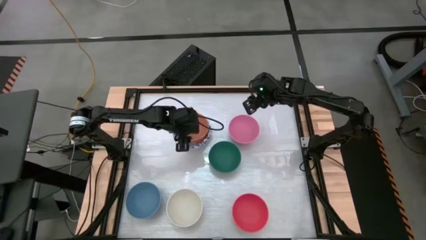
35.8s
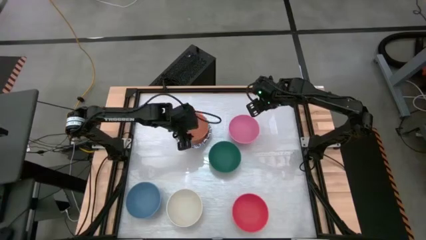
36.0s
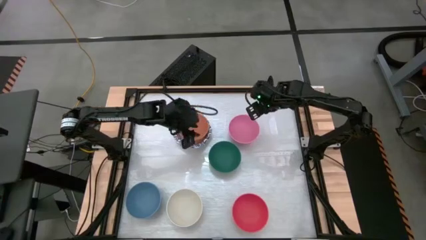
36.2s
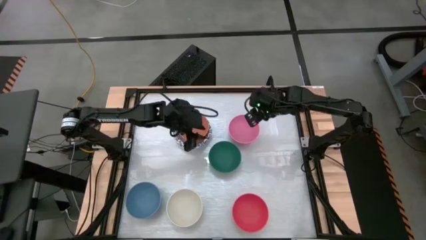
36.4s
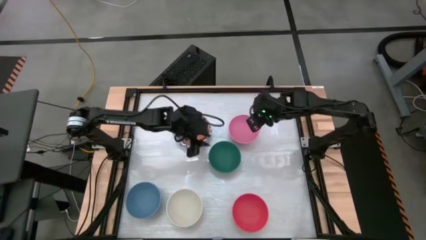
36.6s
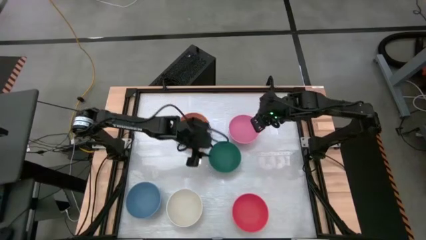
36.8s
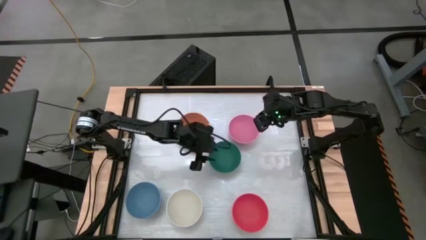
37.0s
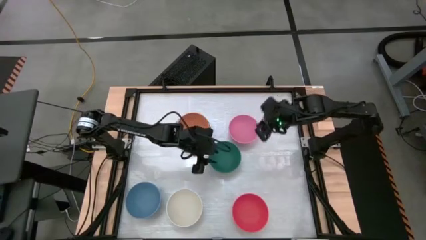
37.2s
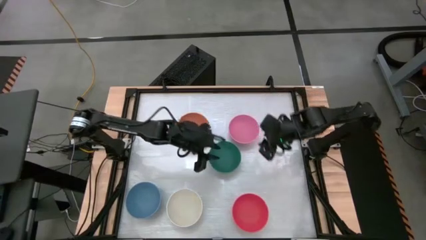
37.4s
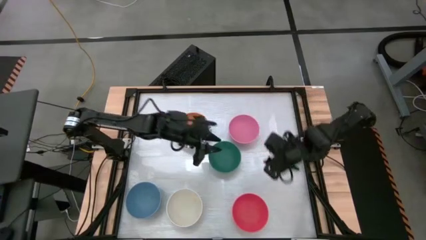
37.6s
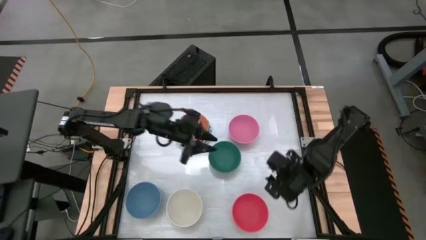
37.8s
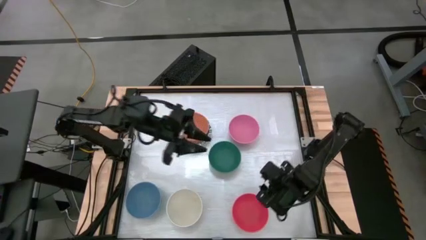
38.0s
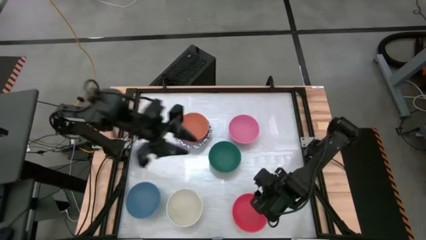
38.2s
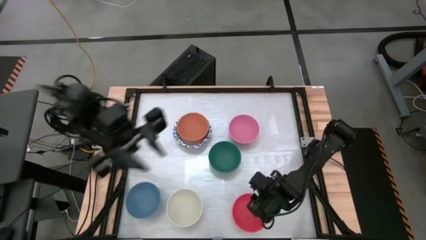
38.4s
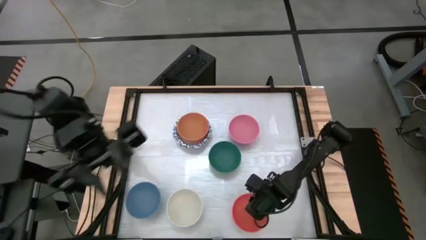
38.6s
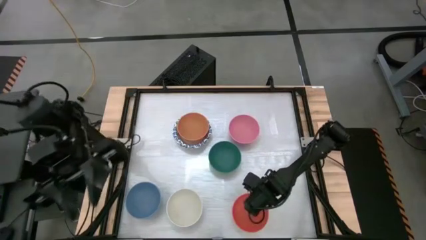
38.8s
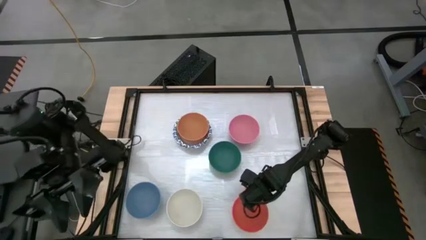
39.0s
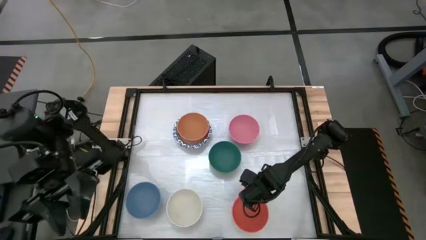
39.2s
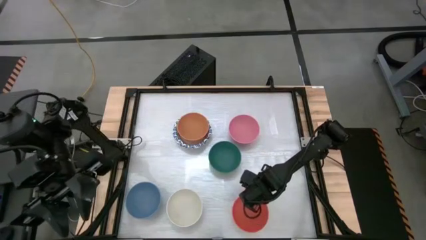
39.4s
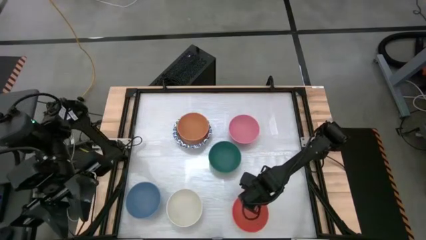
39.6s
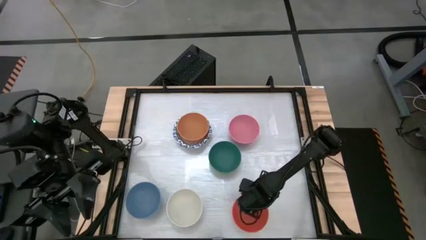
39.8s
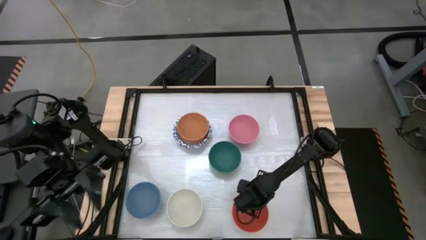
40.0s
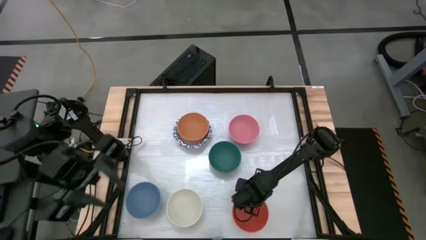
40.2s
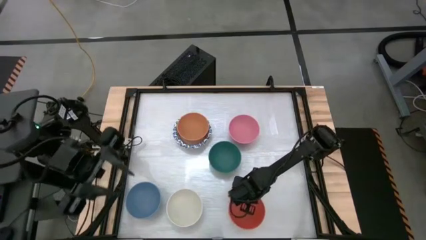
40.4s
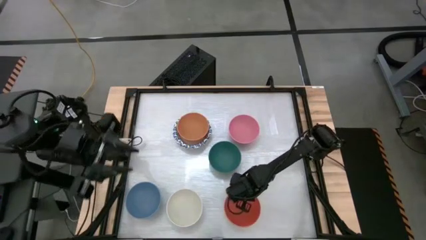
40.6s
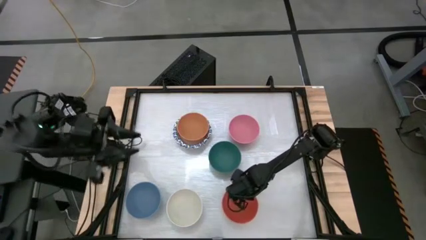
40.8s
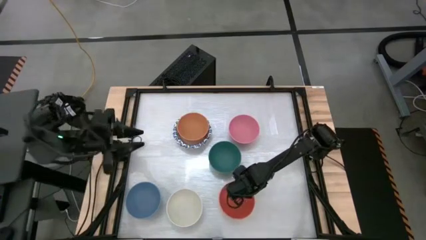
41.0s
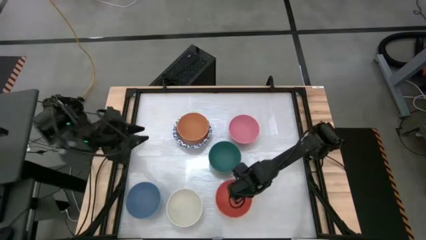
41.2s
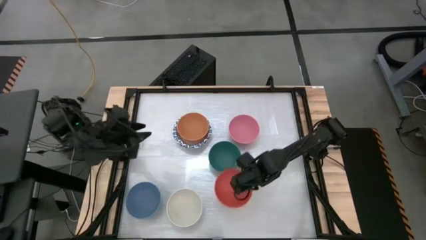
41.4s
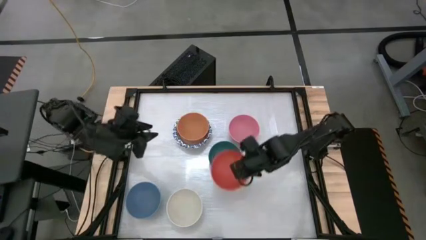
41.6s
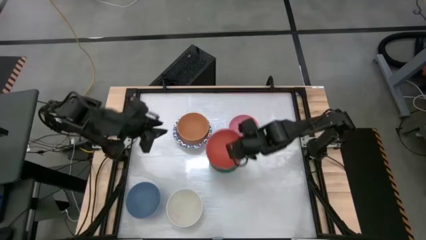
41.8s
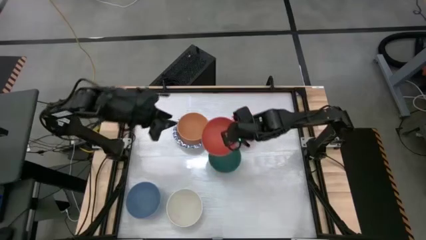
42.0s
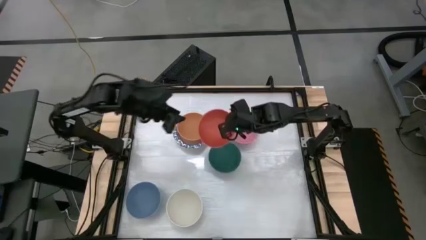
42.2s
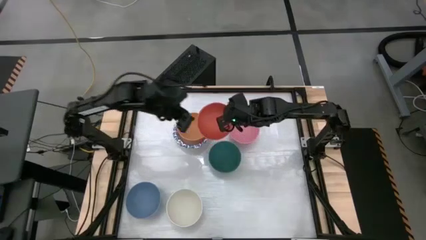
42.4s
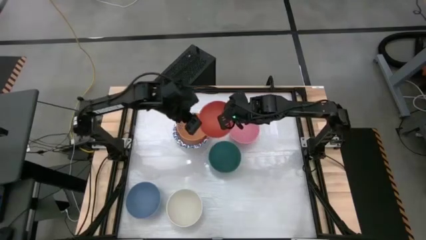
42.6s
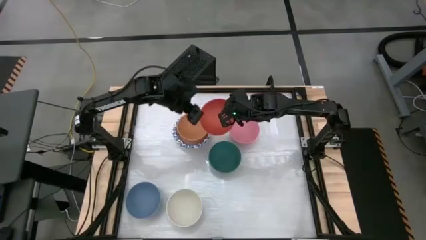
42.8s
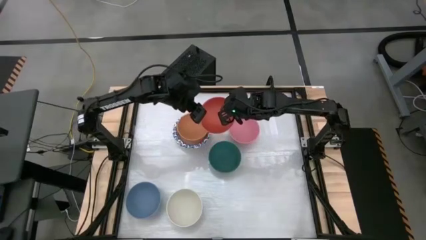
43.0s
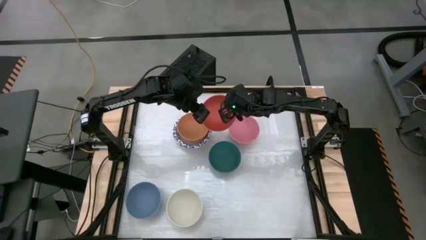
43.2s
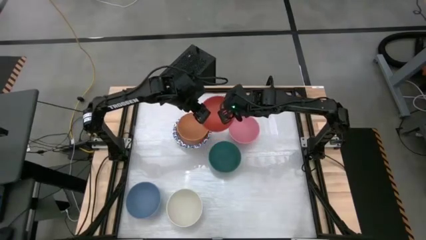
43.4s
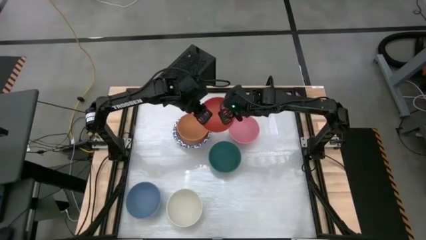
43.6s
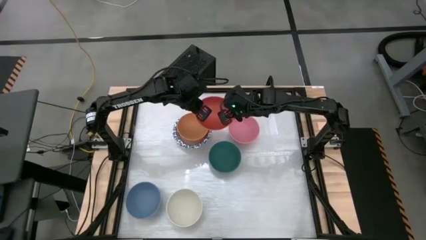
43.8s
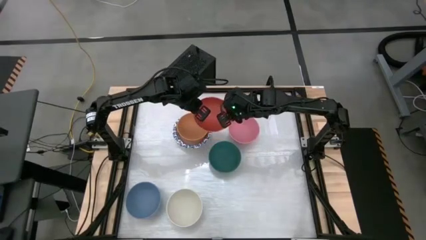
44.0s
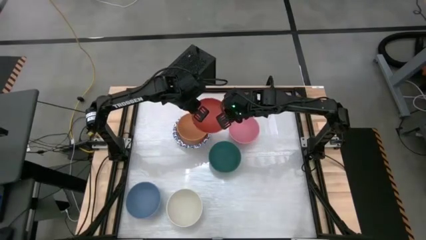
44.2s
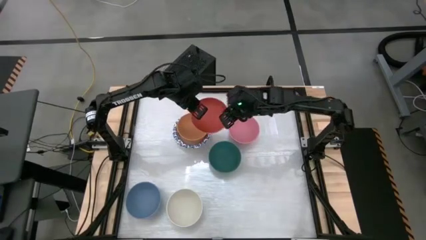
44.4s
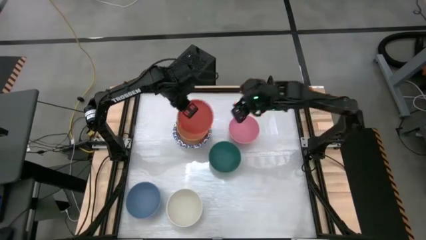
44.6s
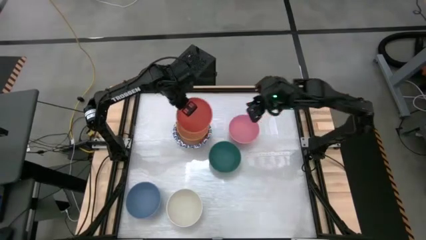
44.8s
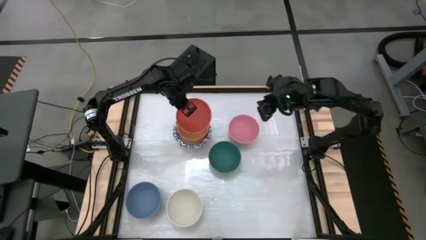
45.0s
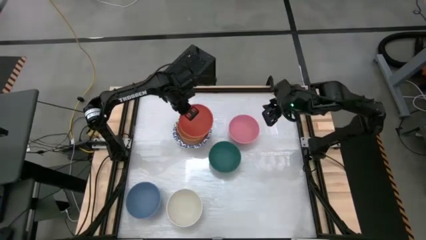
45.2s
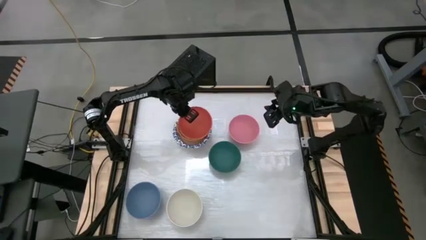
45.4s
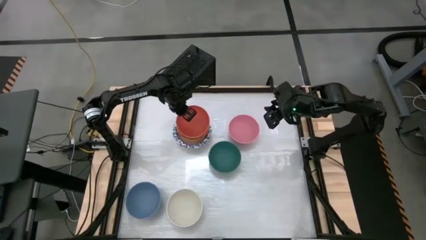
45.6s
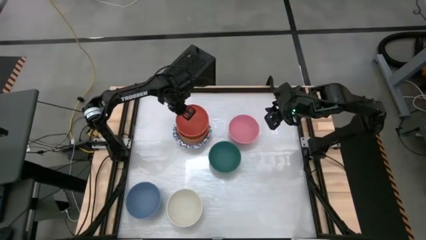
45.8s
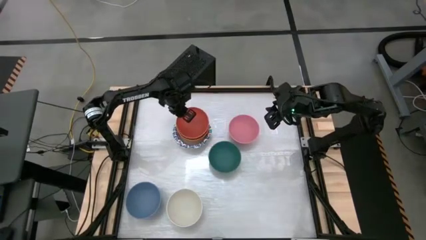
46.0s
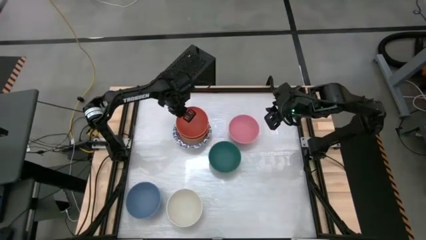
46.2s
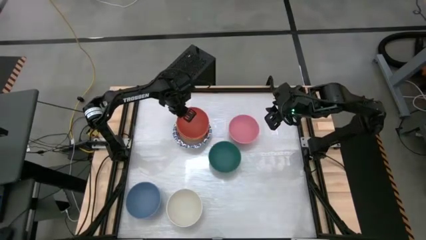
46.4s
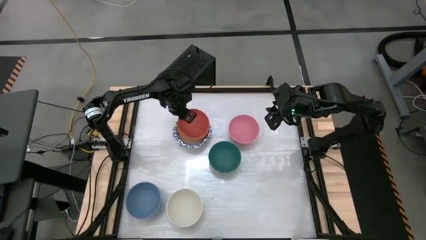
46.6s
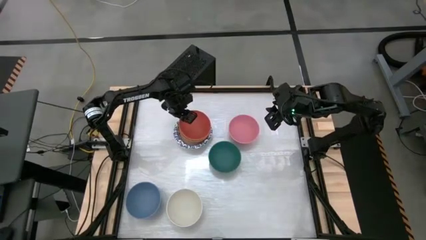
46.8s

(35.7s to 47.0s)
Stack the orange bowl on top of the brown bowl
